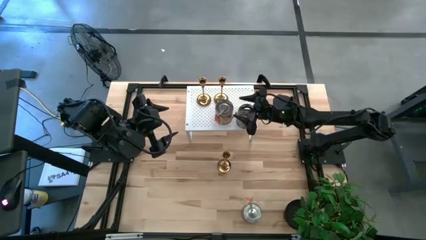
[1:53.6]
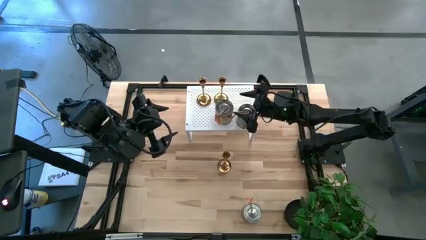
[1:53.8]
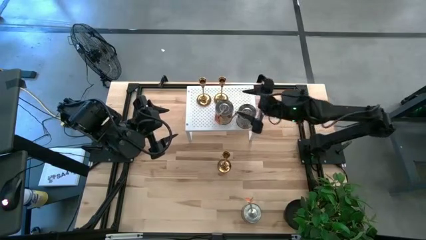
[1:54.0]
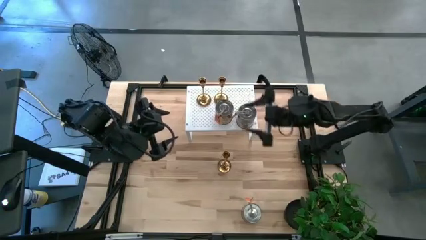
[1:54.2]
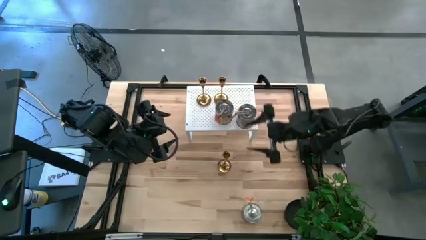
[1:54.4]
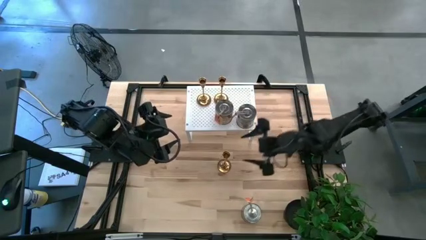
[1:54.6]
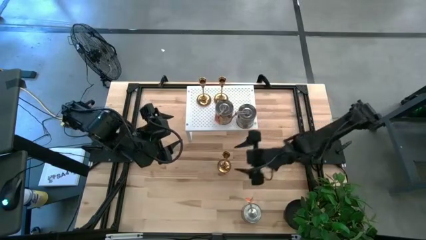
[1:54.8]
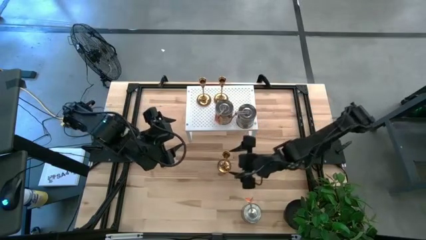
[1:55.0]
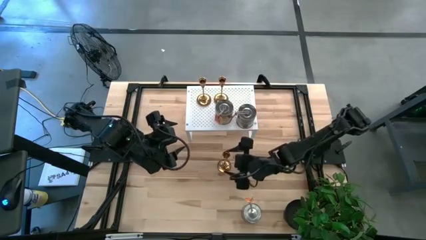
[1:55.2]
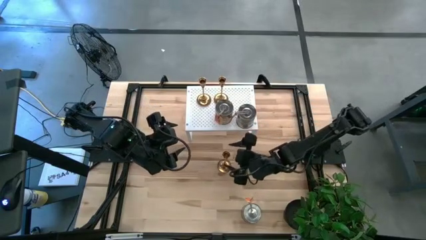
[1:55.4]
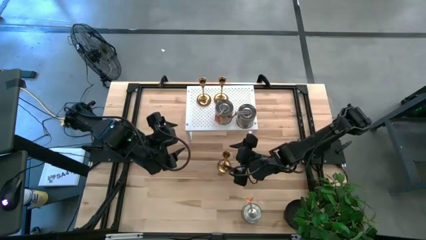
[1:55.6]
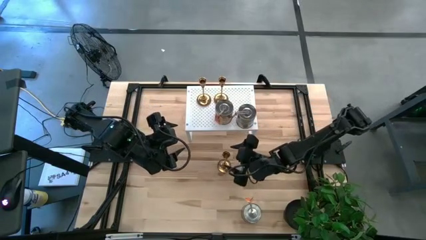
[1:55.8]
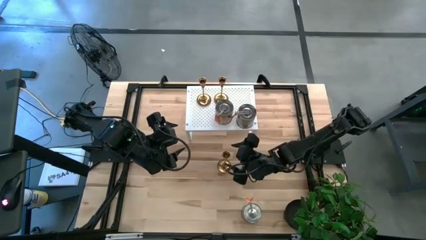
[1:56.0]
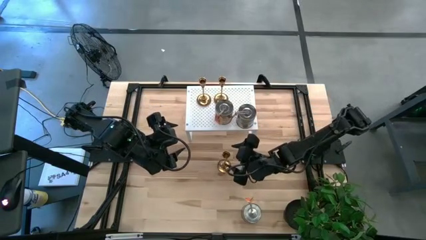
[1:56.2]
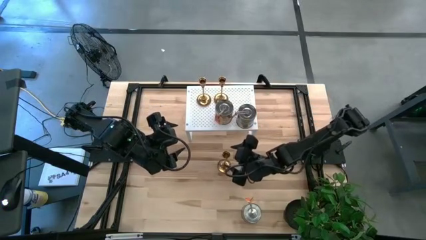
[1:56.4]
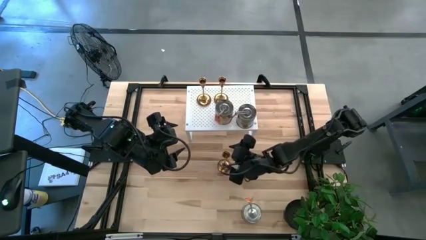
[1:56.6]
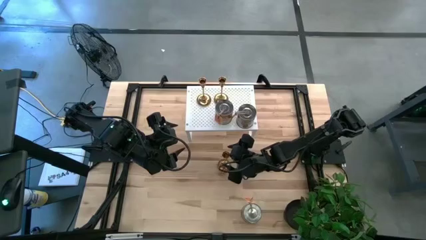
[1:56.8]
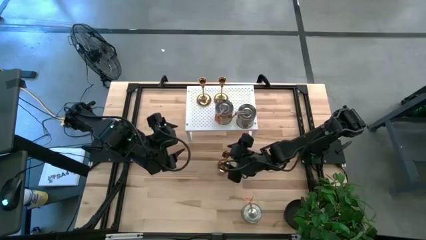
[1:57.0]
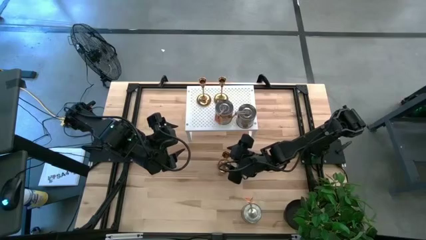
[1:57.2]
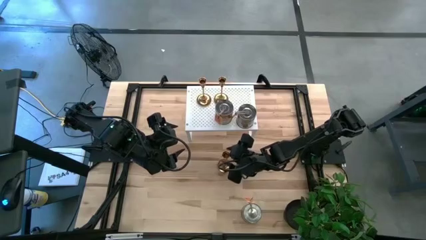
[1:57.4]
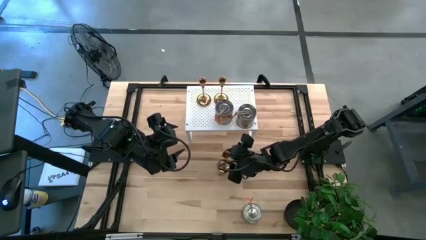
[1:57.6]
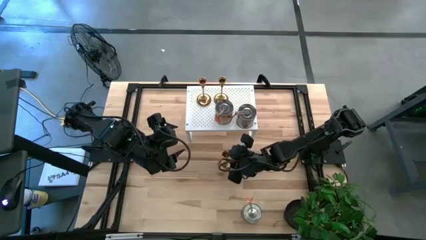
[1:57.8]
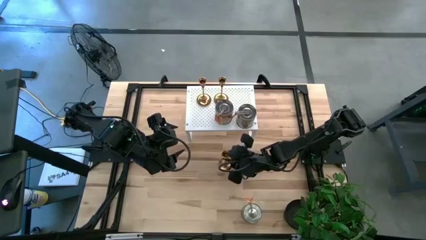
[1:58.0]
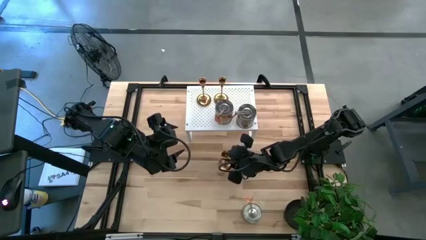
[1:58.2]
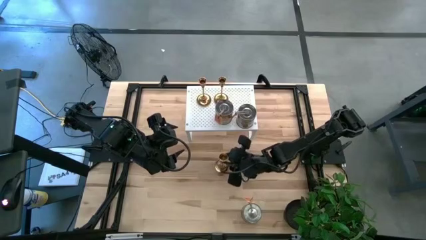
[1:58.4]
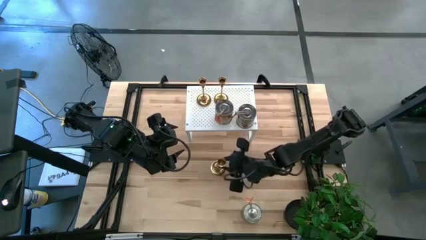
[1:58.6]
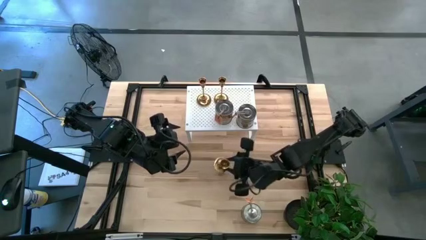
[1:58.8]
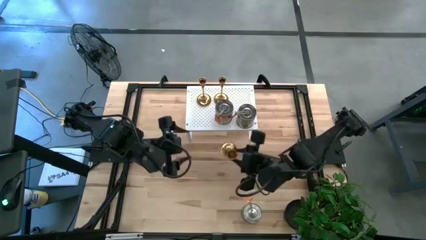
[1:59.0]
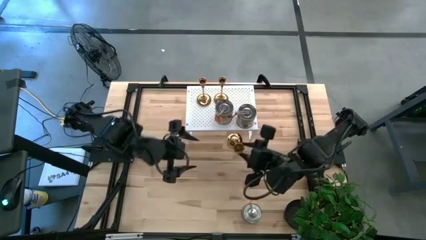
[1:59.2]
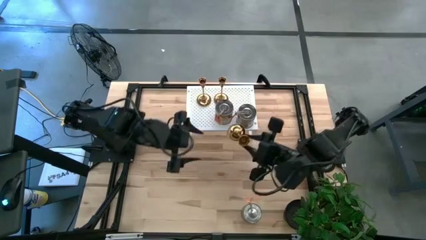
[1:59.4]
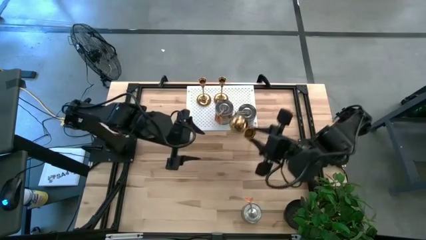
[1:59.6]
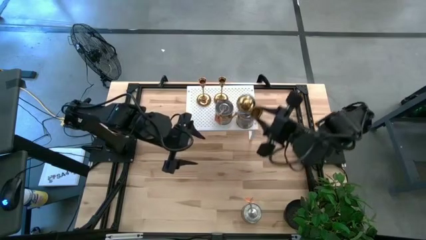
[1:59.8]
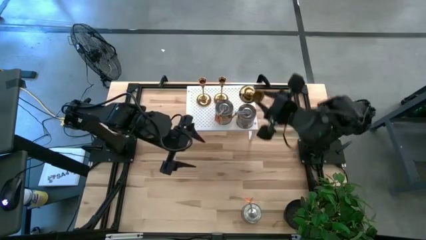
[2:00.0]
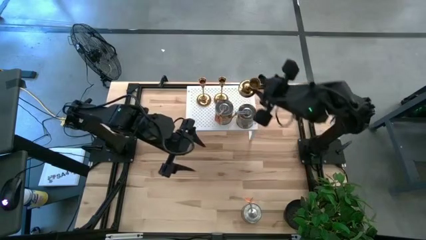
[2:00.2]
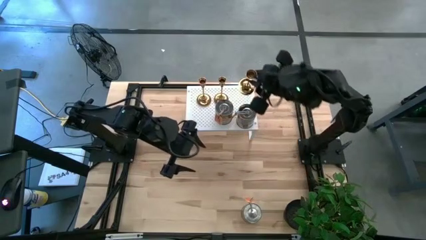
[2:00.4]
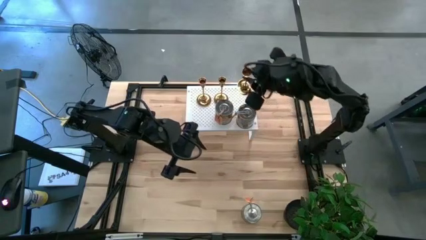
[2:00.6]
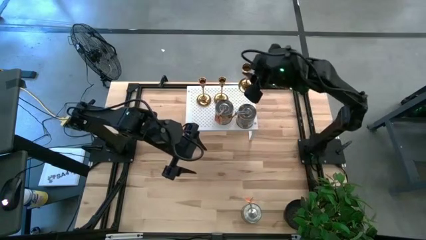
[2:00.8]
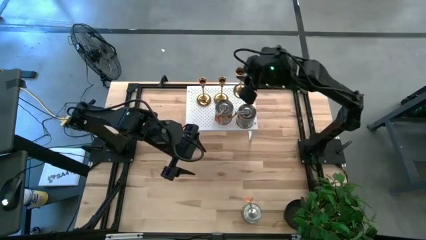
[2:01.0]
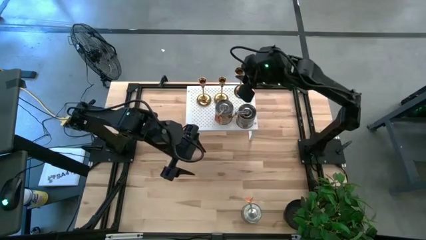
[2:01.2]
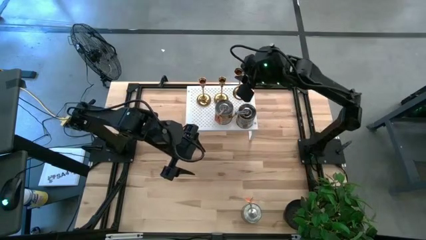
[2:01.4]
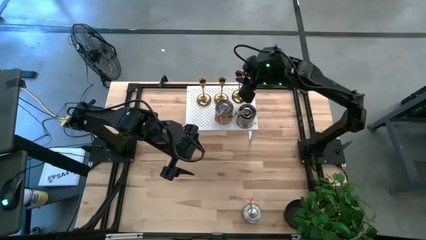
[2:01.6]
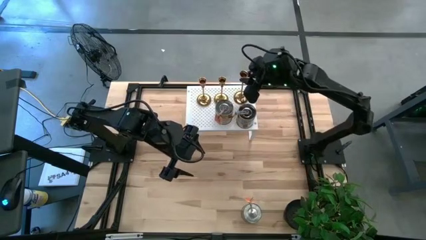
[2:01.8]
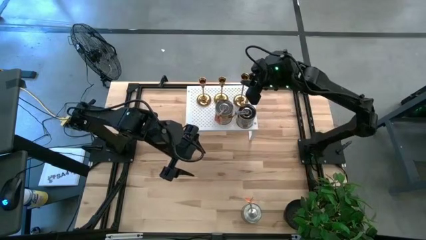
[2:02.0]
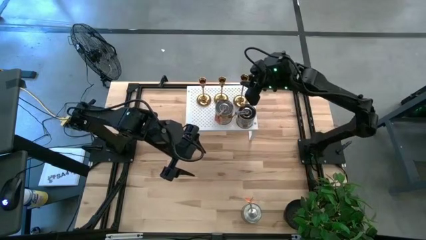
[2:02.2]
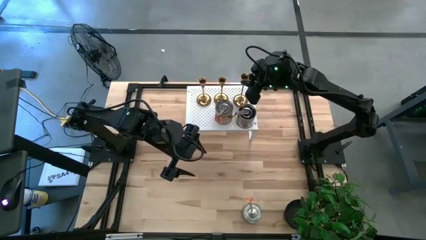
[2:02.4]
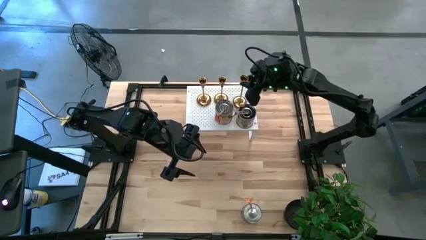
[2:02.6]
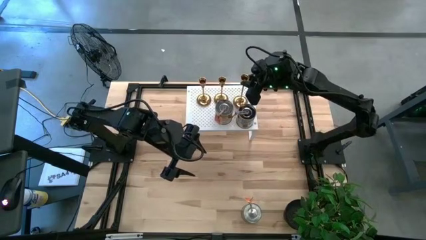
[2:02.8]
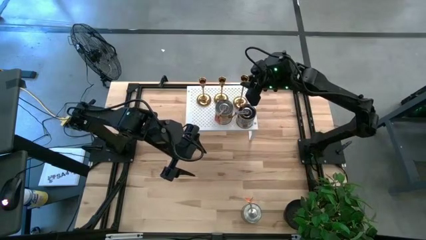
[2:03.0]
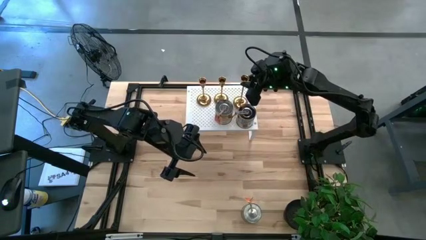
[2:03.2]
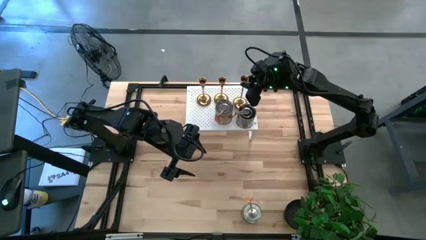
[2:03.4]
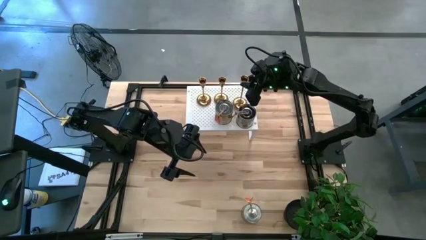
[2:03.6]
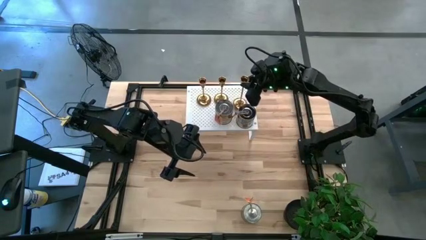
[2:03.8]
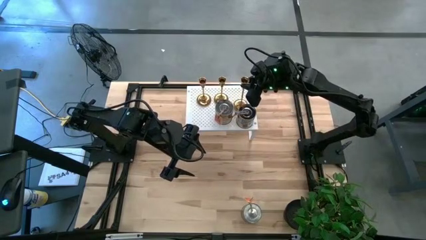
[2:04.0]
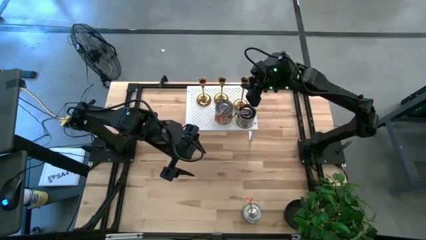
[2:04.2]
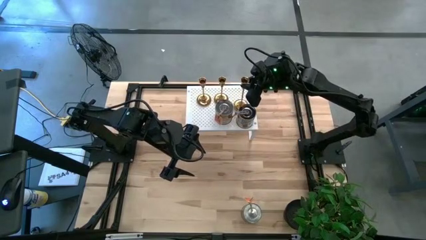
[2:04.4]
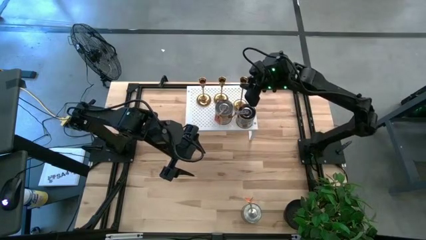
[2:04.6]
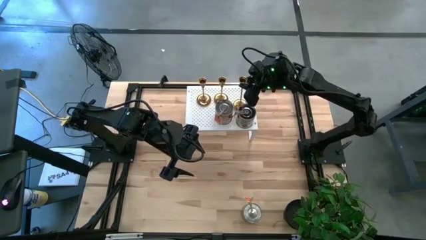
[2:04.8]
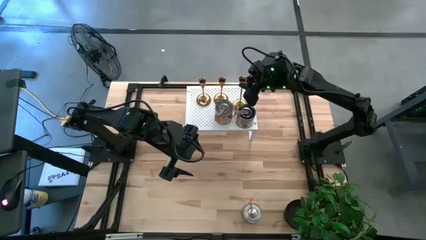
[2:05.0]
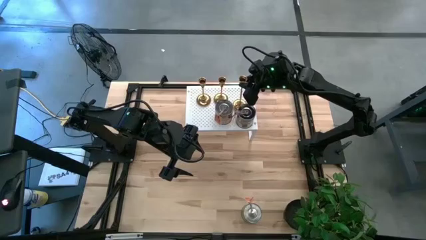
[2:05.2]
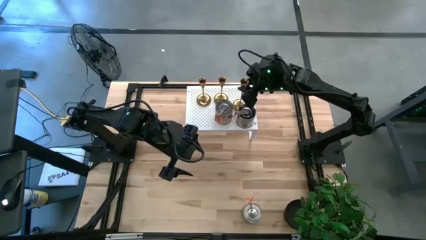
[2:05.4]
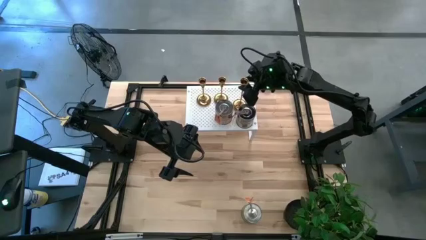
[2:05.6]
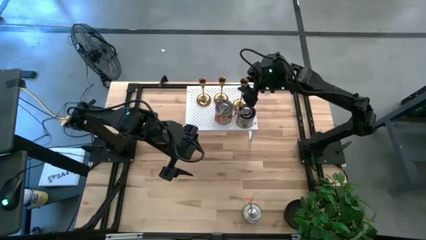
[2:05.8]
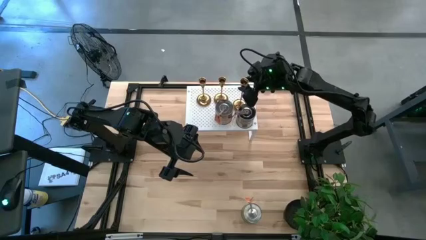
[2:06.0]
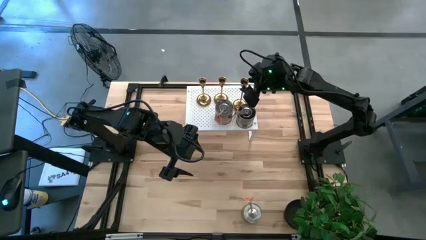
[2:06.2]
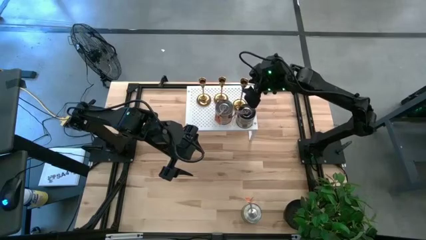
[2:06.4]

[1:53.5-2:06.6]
Task: Pick & Place candle stick holders
Put the gold candle holder on the shelf aligned with the other gold candle holders

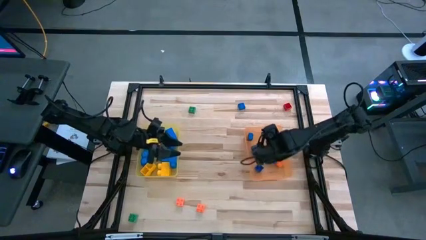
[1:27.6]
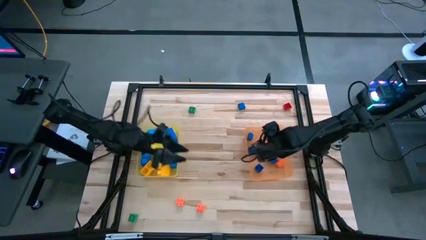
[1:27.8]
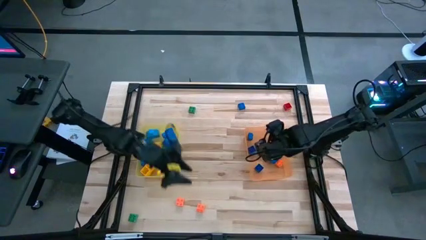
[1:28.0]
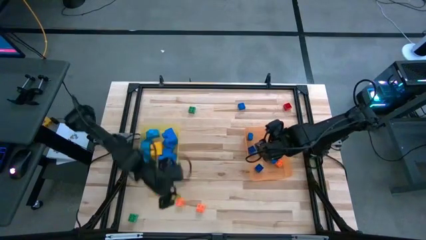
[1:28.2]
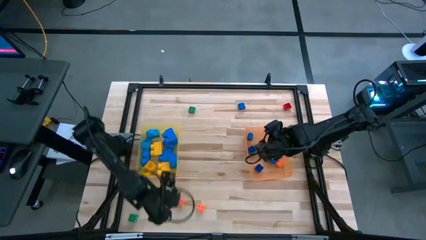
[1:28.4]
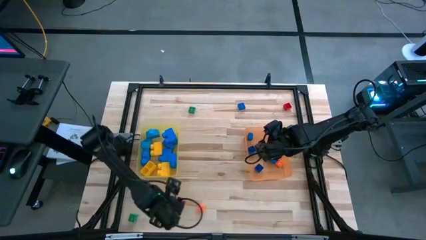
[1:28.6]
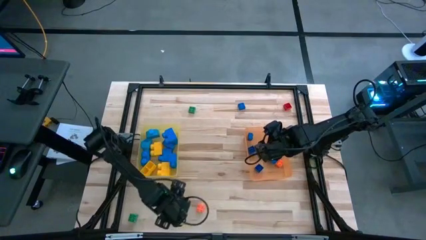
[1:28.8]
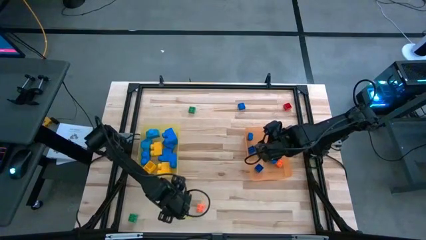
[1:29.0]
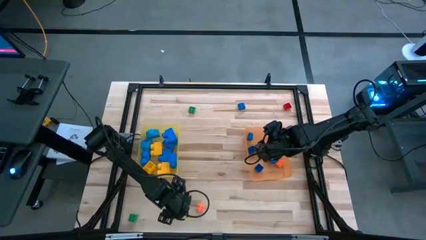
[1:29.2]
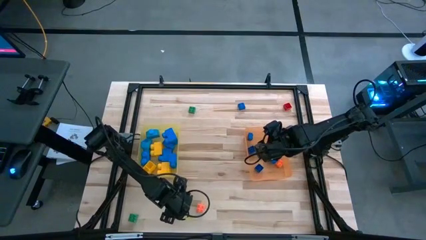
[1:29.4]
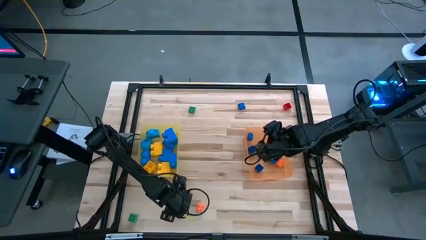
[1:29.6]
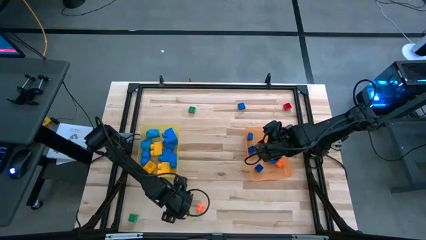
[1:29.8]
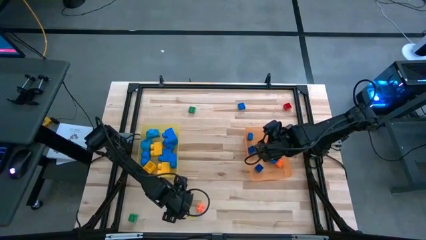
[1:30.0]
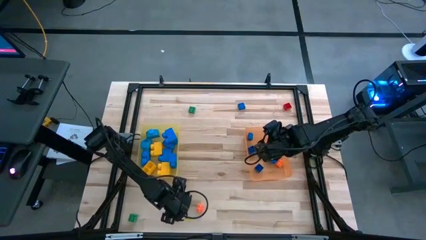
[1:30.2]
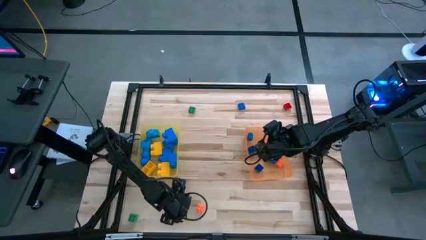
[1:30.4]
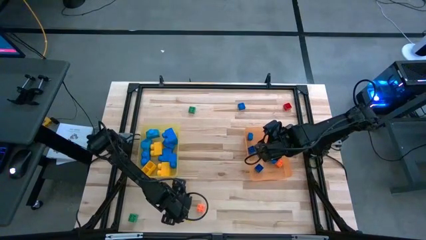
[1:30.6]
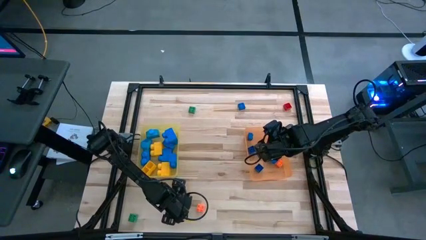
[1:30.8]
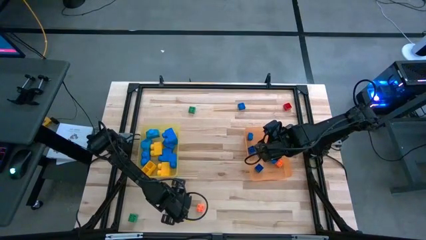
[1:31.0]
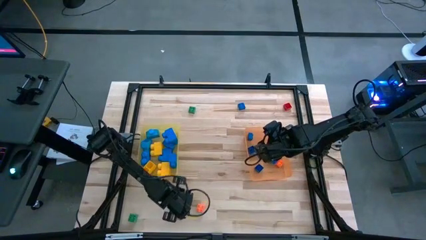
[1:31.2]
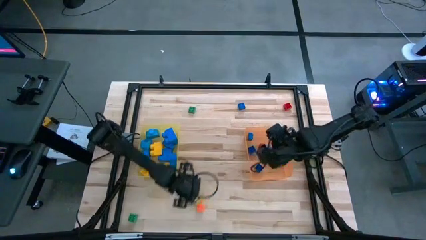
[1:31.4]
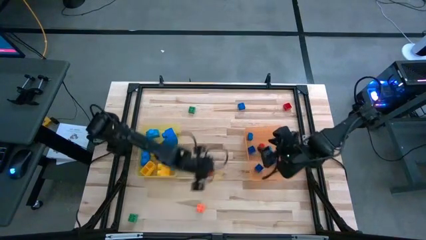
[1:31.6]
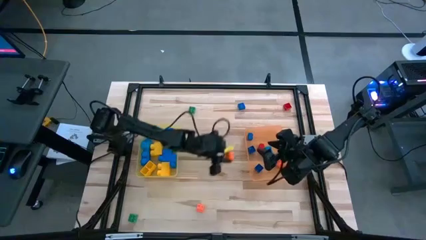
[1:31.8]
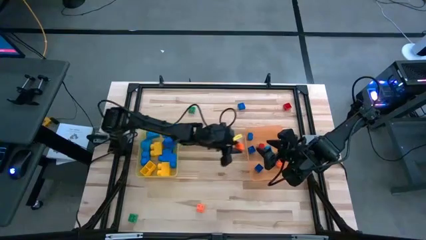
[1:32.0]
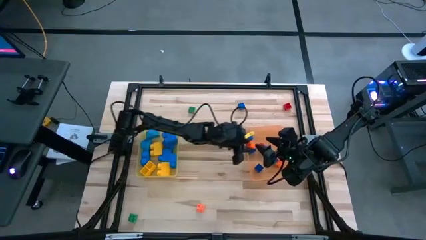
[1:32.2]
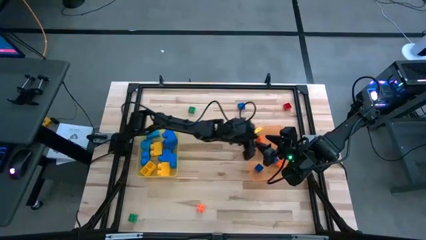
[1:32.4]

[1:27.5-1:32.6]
Task: Sort blocks by size
Put the small orange game piece into the orange bin
